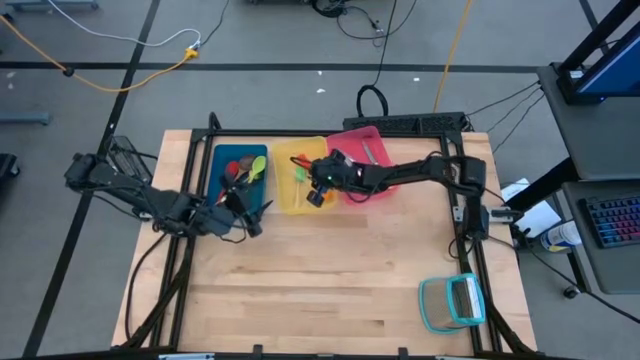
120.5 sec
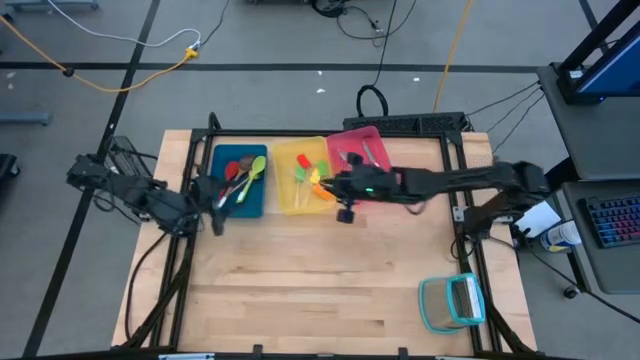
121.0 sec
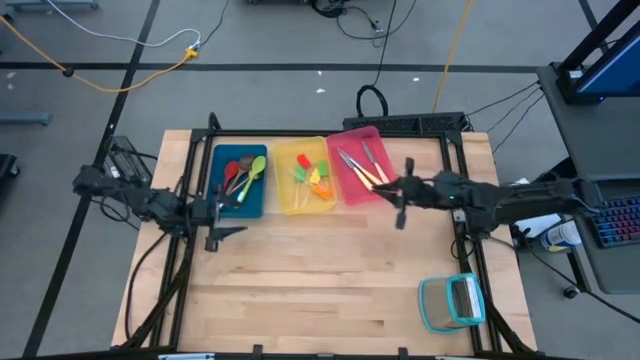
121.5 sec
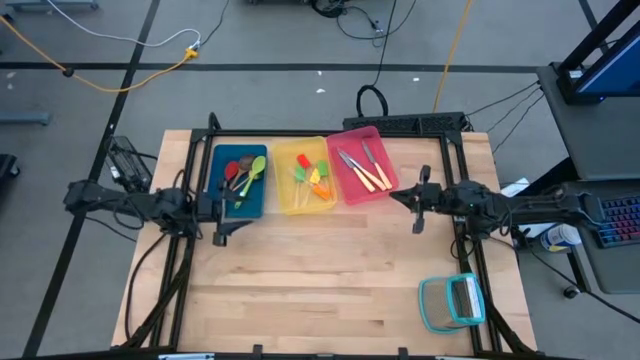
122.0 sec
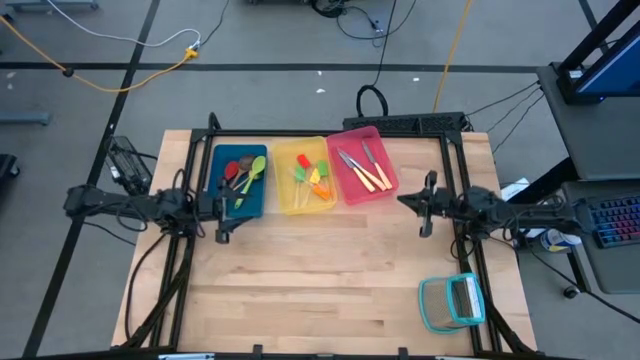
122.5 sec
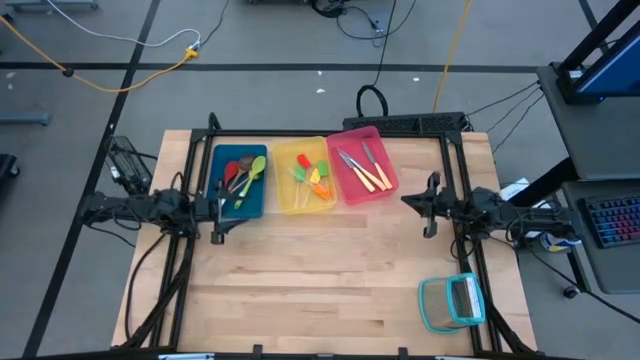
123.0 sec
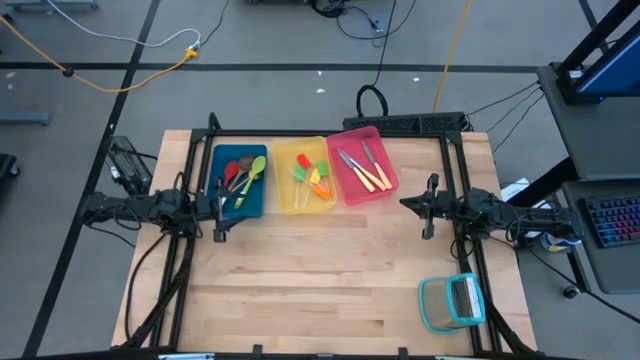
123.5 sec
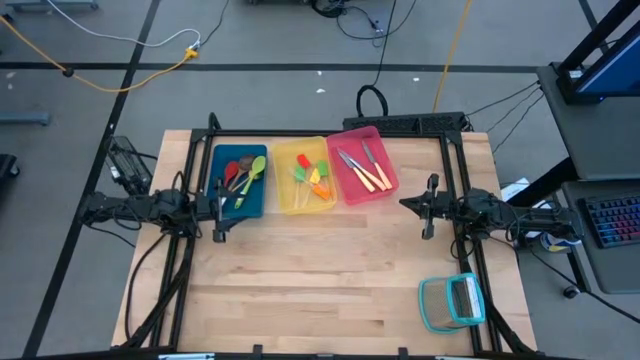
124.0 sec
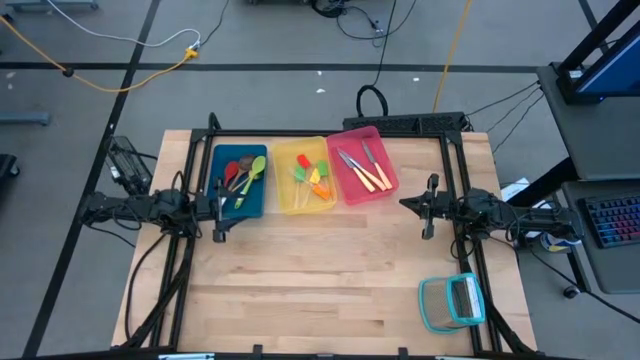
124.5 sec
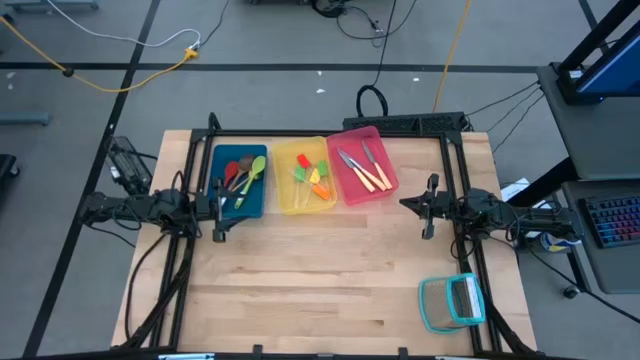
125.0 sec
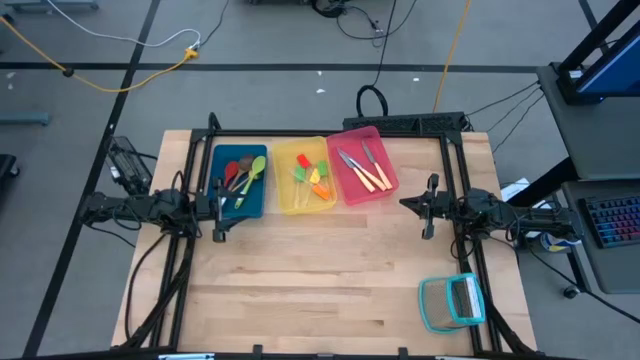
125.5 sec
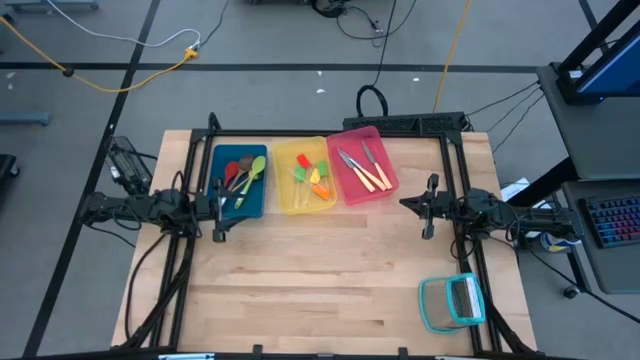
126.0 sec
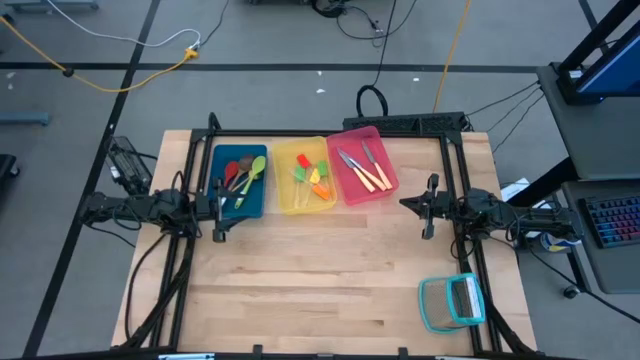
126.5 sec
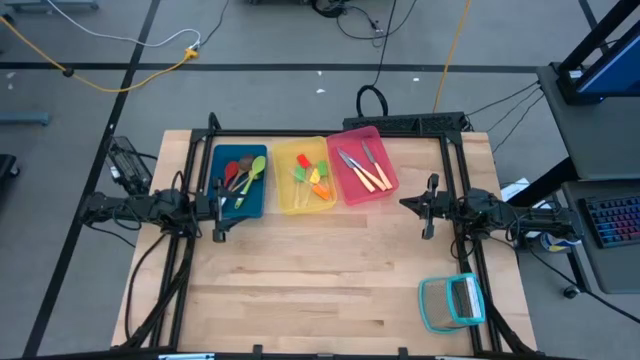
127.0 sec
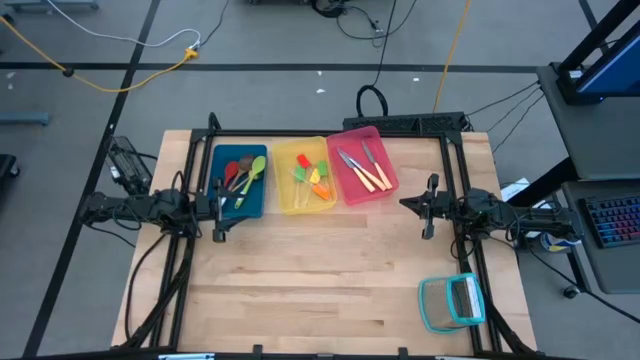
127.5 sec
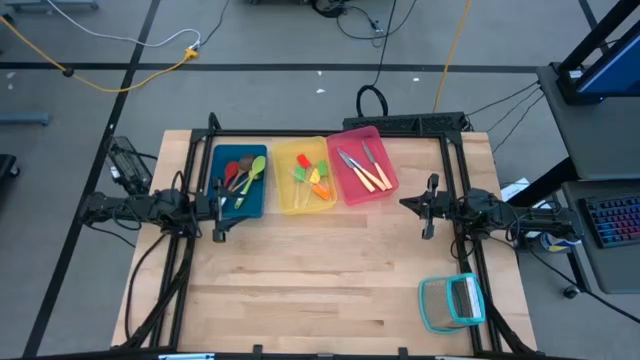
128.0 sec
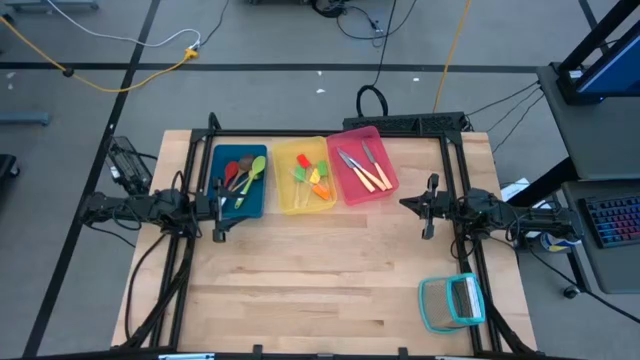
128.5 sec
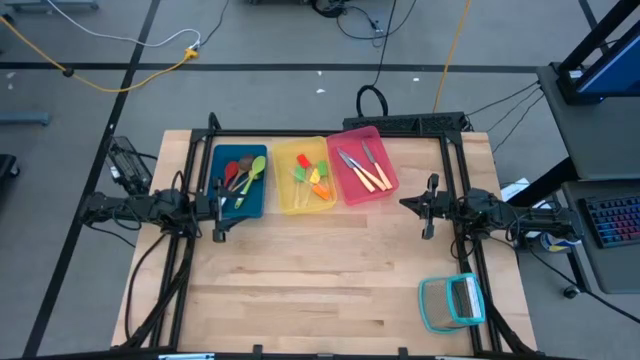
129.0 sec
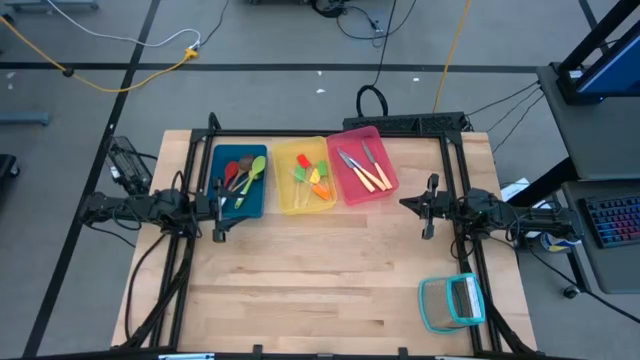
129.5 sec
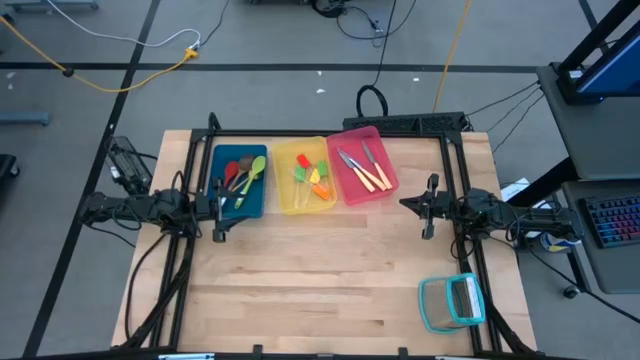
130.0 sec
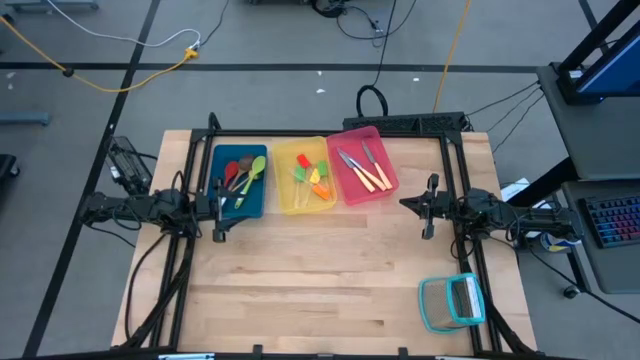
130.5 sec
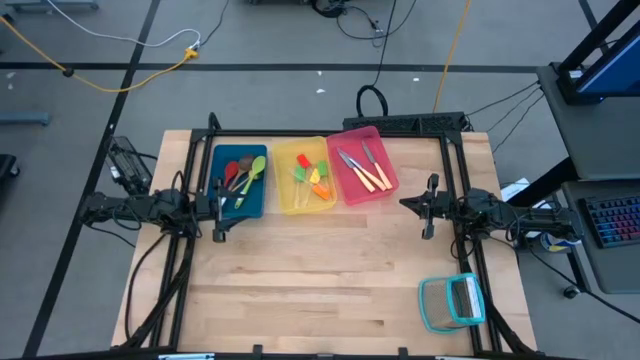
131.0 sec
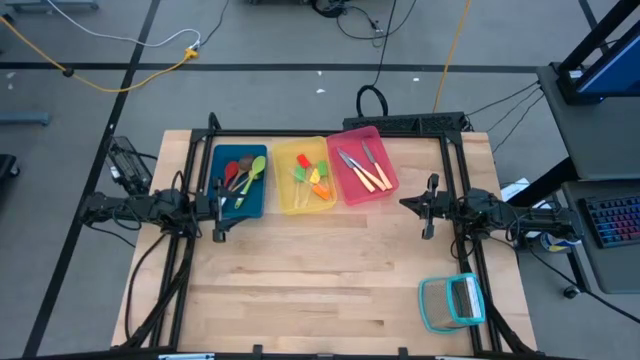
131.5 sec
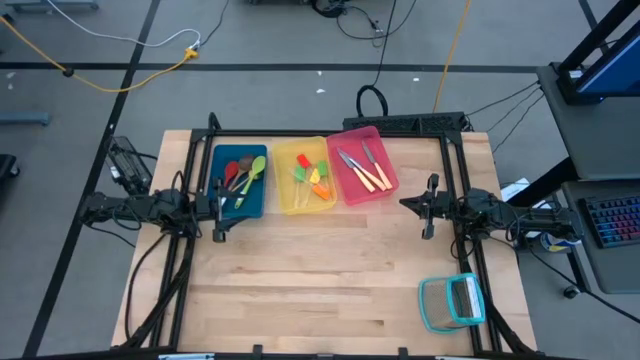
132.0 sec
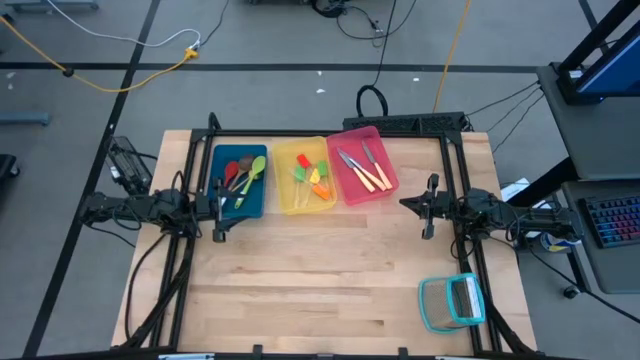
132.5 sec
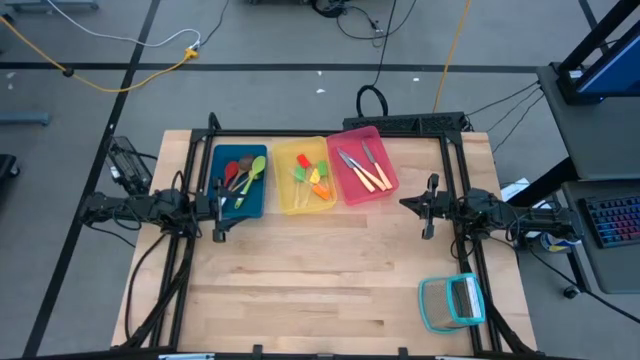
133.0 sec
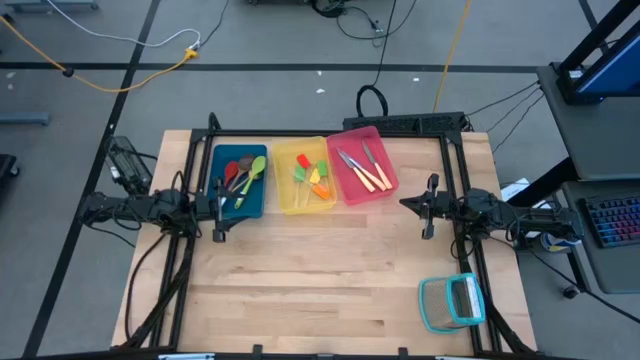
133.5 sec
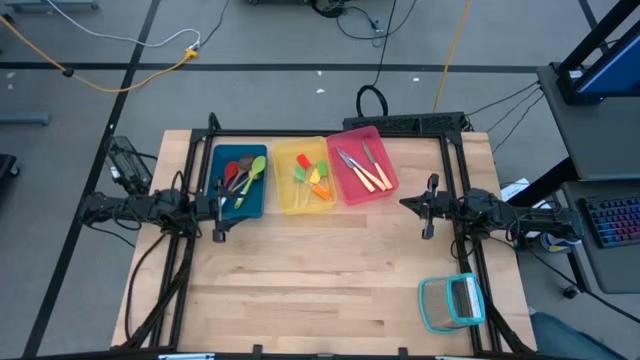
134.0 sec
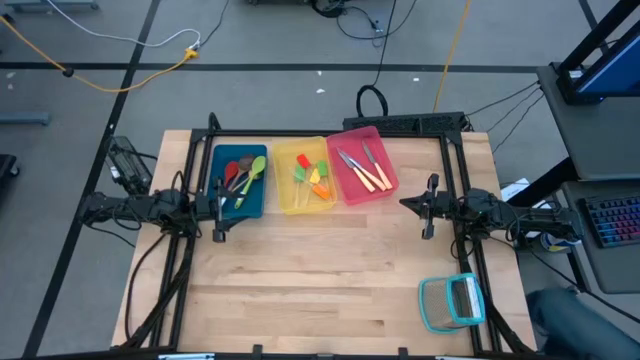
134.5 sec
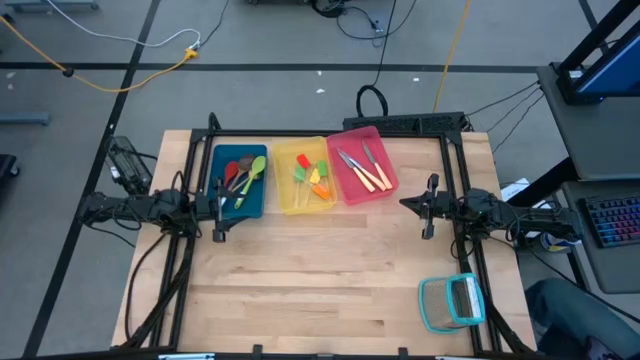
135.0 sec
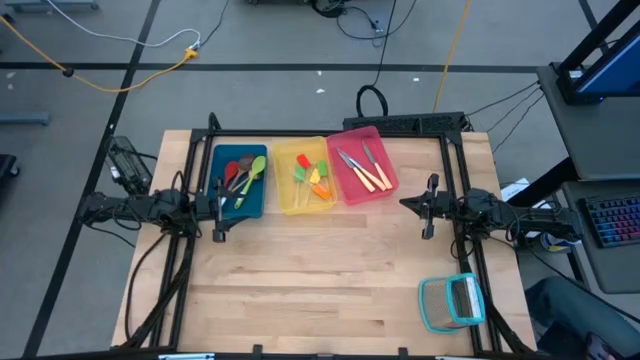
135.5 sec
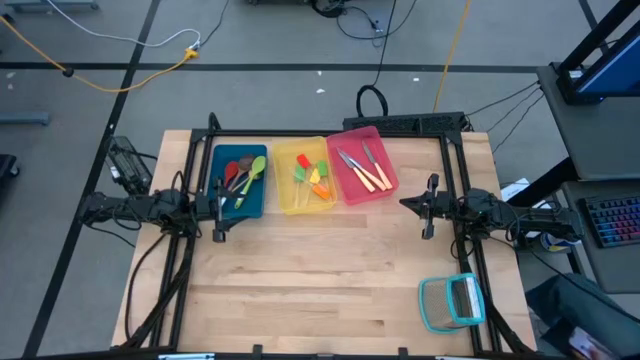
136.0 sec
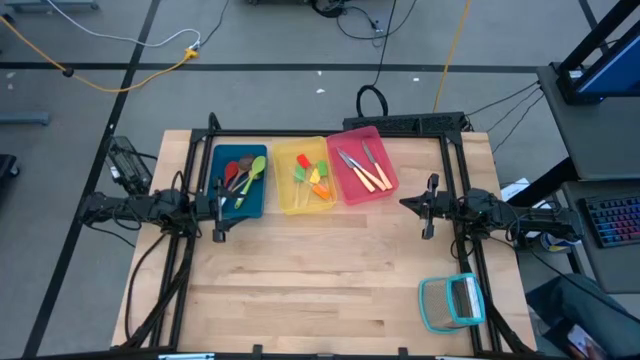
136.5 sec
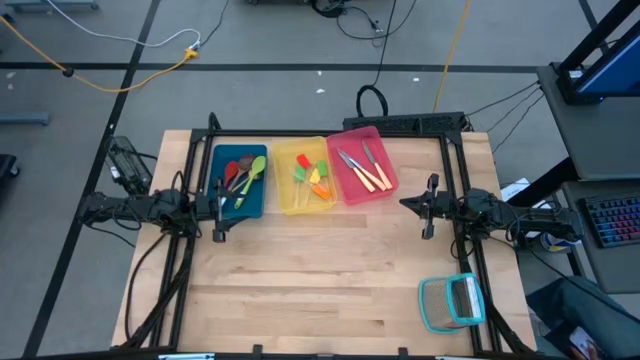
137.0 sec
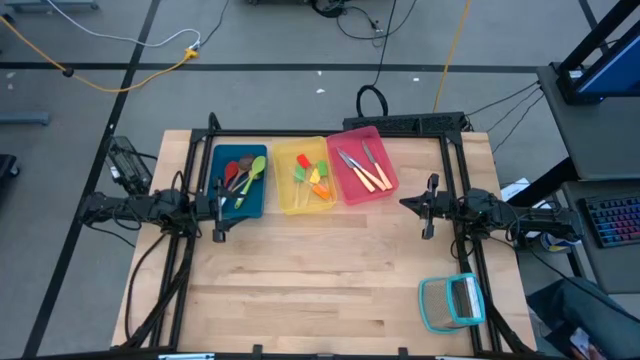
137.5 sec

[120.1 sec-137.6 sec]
Task: Pick & Place Kitchen Items
Return to Home Position

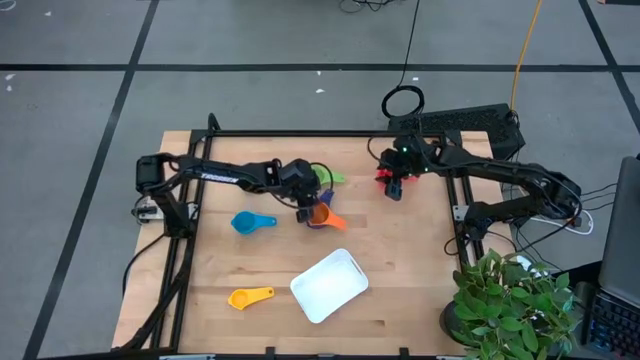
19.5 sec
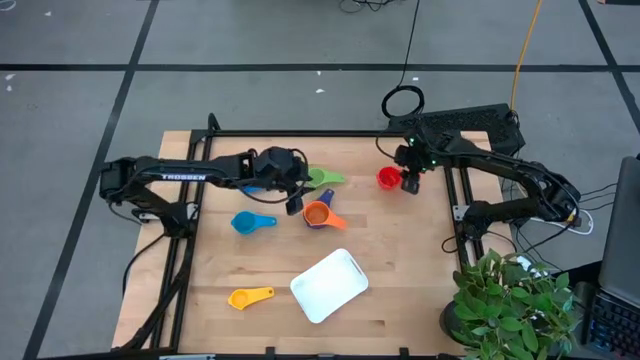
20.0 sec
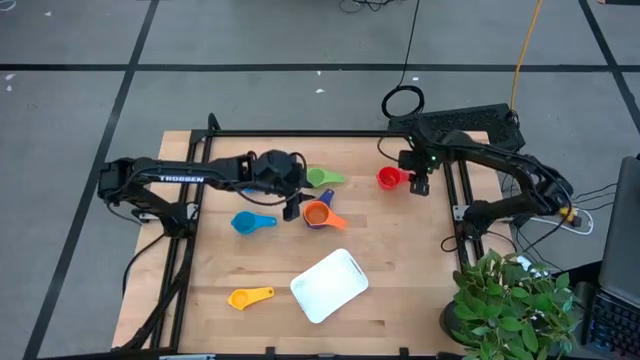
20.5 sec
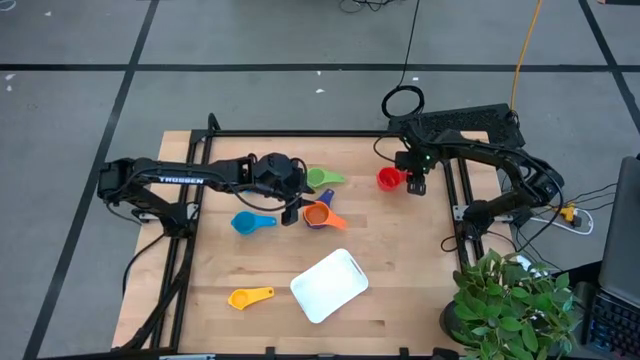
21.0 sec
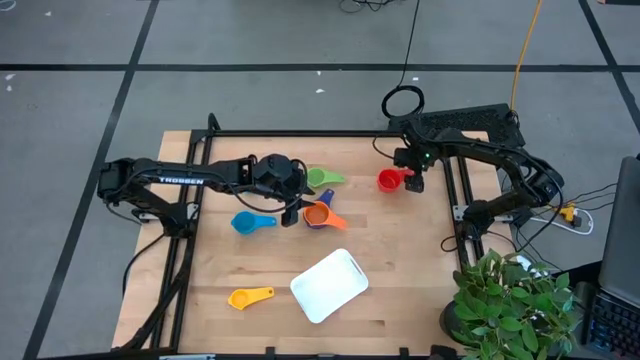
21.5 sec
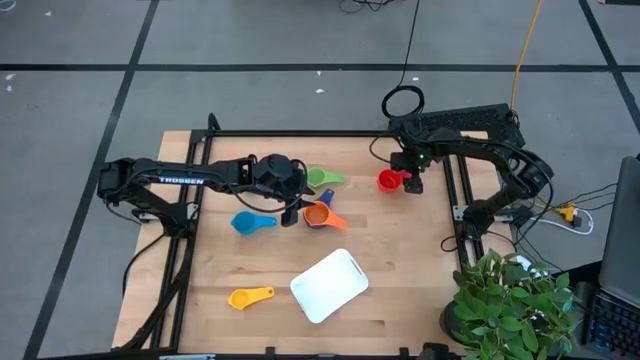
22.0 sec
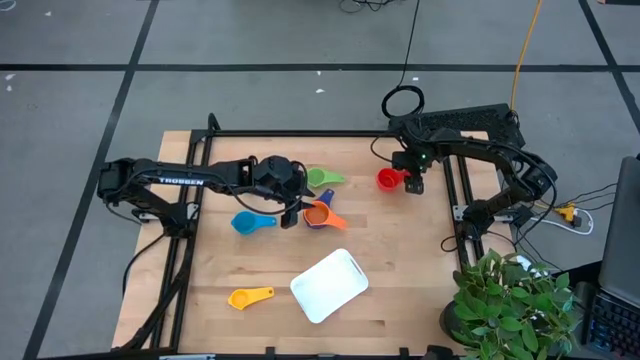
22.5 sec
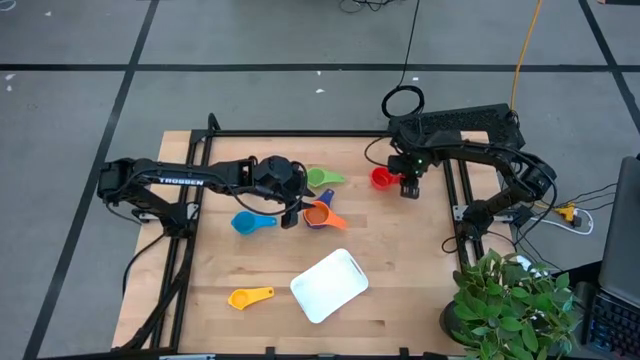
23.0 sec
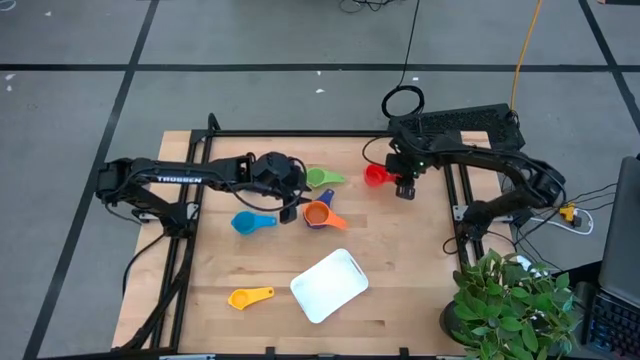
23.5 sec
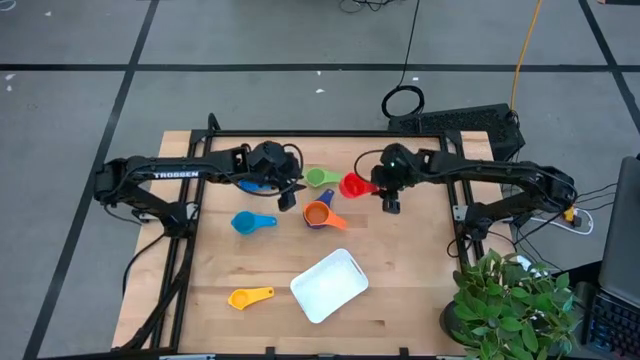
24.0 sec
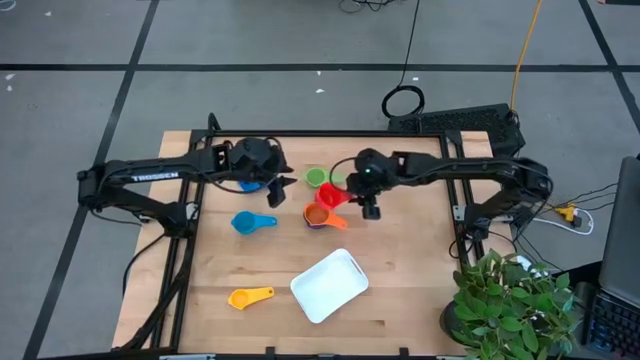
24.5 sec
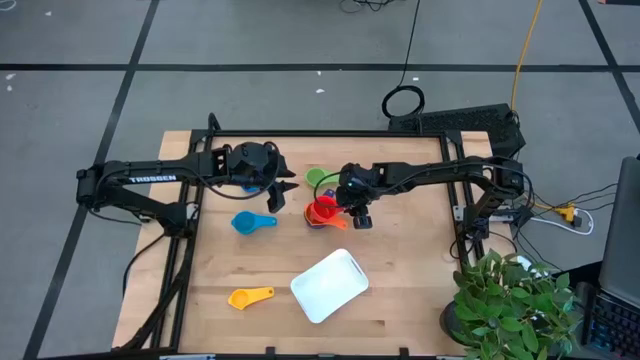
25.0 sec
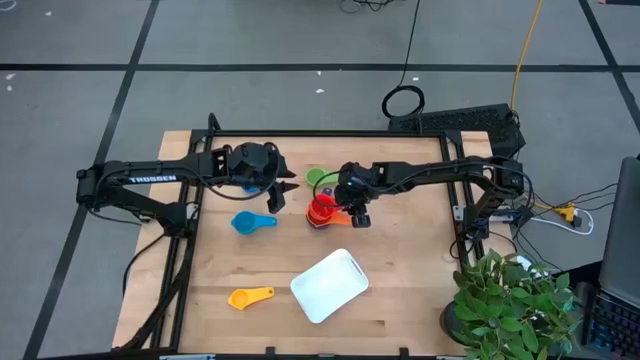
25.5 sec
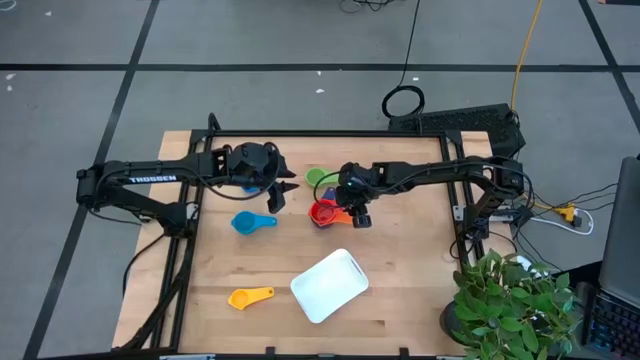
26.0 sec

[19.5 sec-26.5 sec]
Task: Nest measuring cups in basket
Stack the red measuring cup on top of the orange measuring cup
